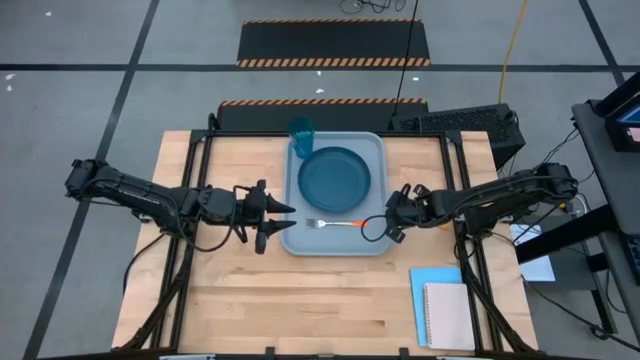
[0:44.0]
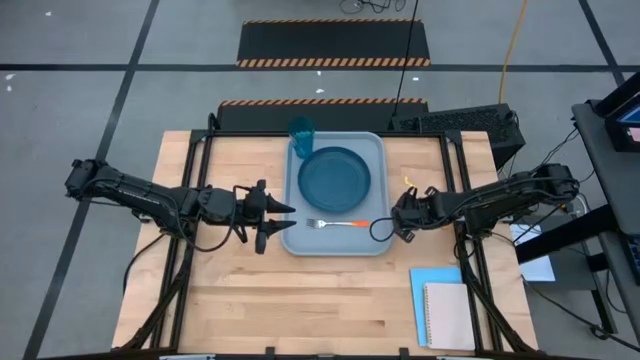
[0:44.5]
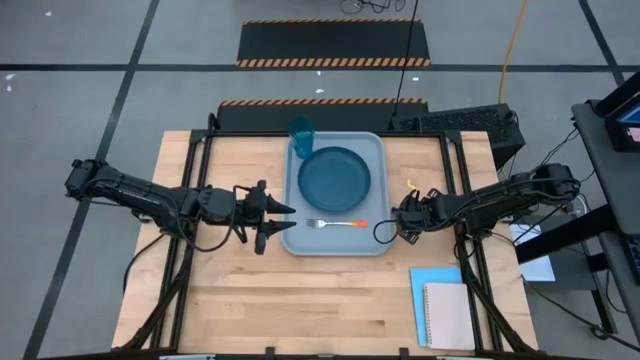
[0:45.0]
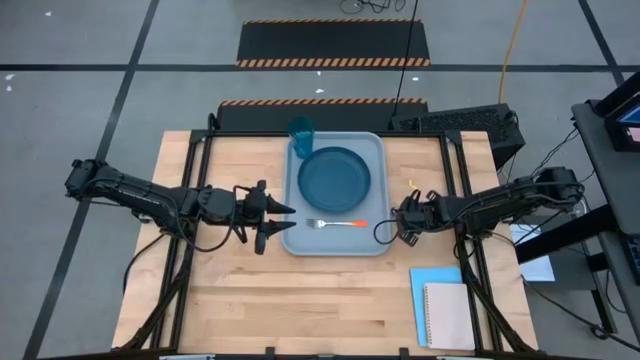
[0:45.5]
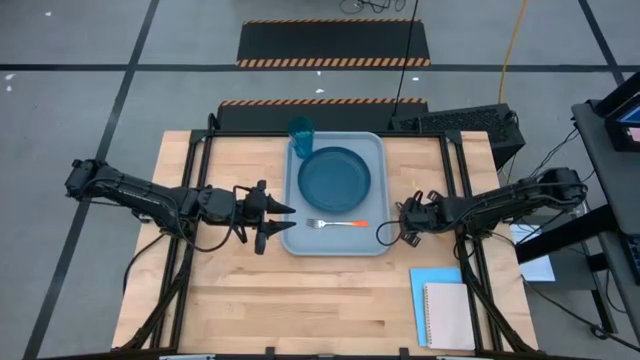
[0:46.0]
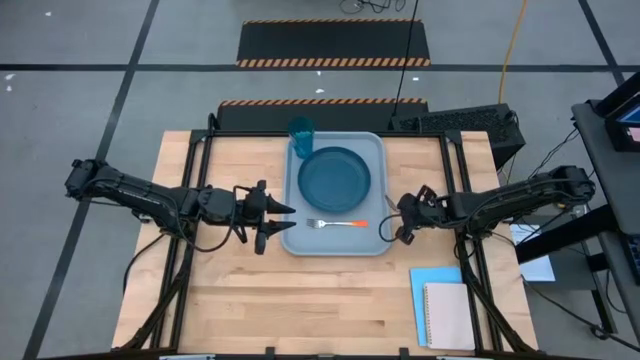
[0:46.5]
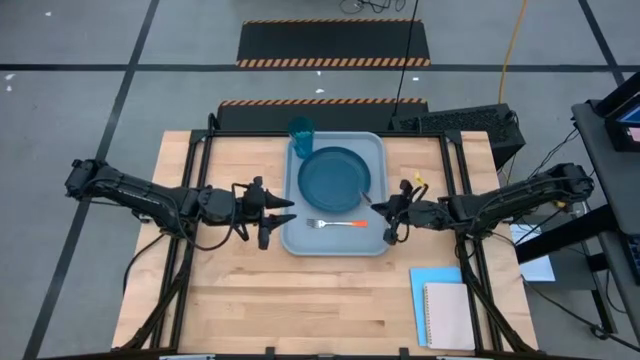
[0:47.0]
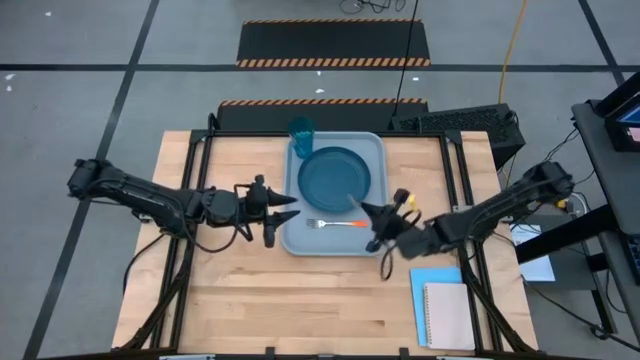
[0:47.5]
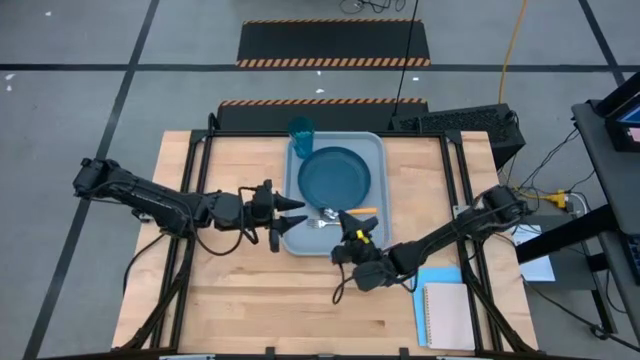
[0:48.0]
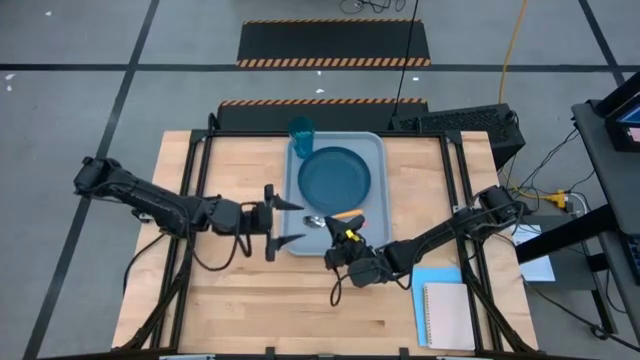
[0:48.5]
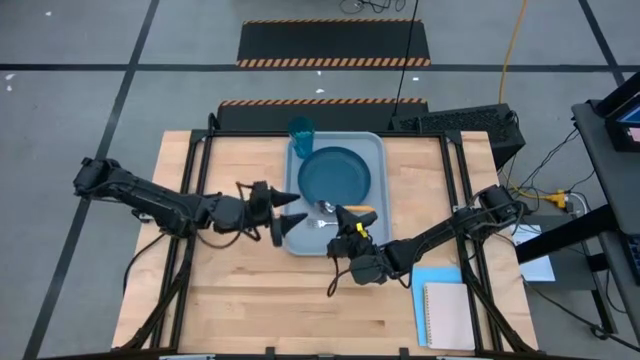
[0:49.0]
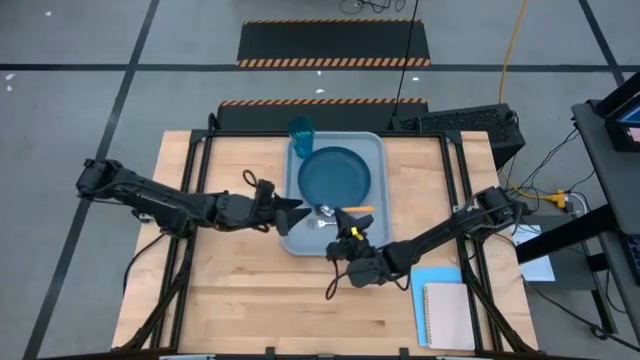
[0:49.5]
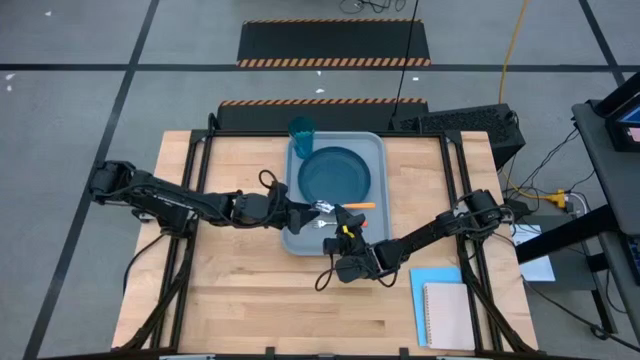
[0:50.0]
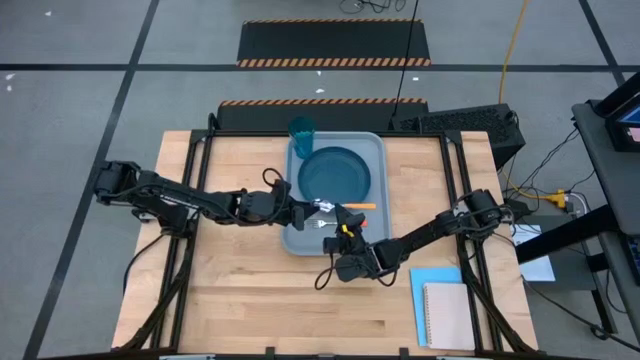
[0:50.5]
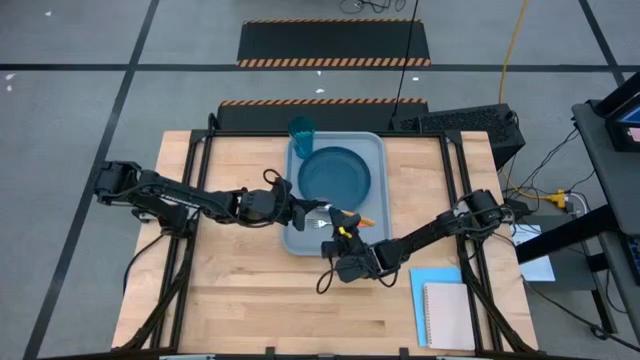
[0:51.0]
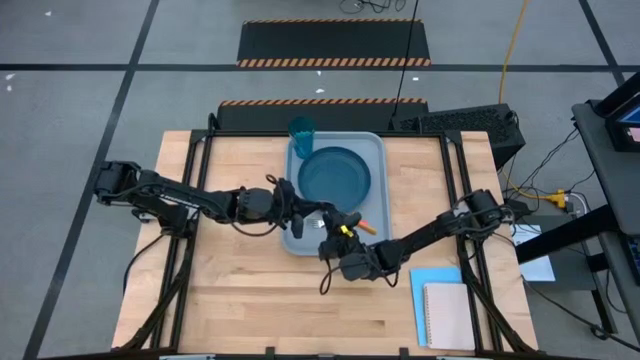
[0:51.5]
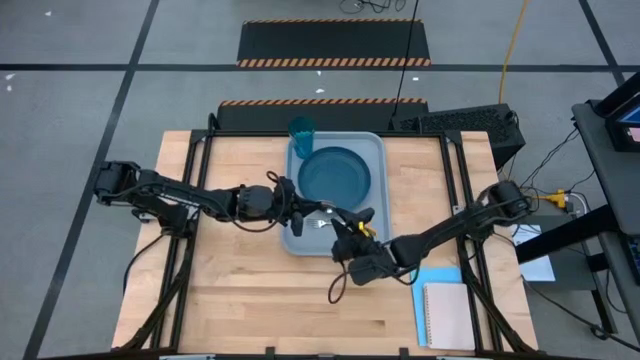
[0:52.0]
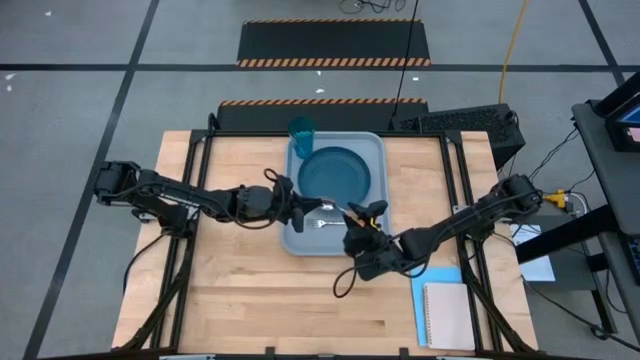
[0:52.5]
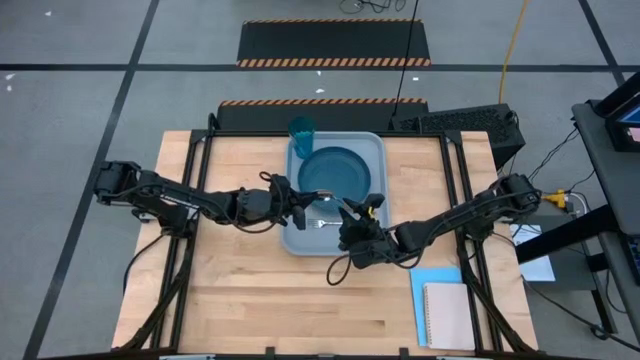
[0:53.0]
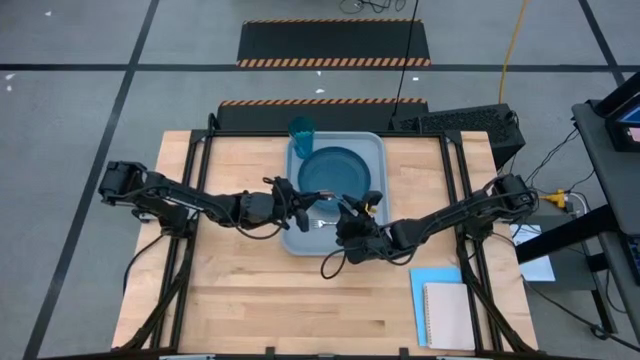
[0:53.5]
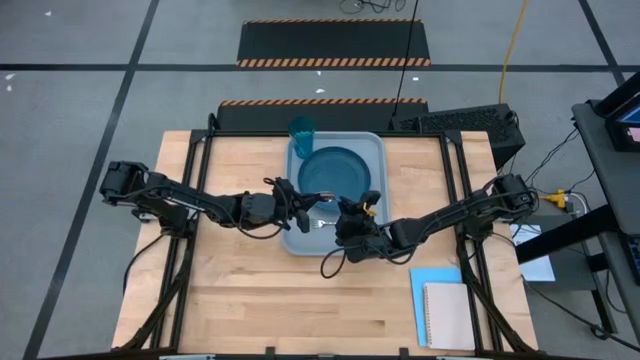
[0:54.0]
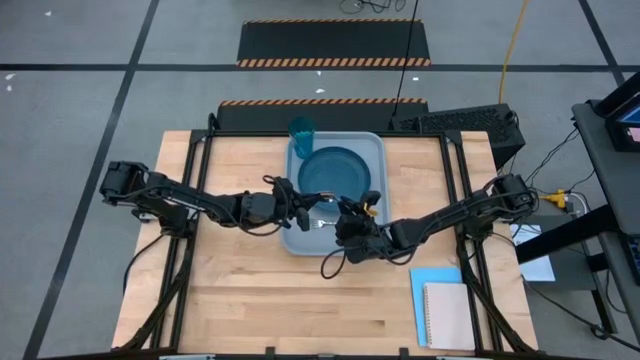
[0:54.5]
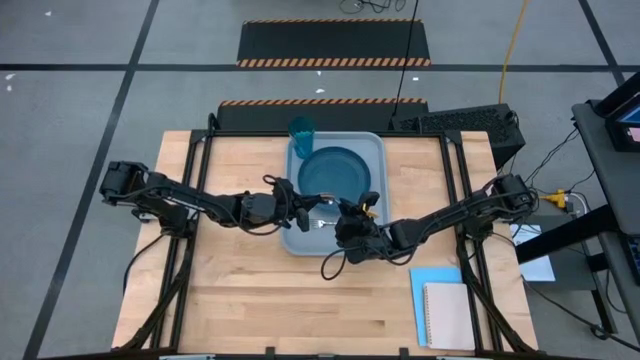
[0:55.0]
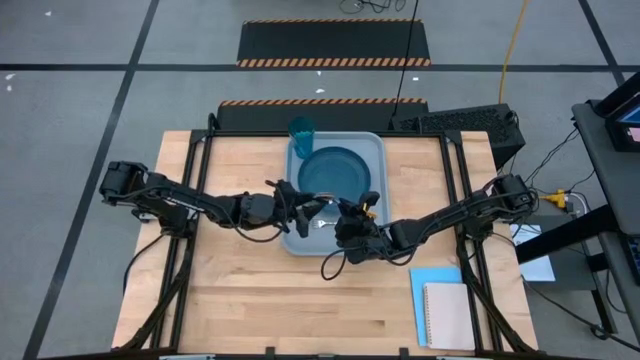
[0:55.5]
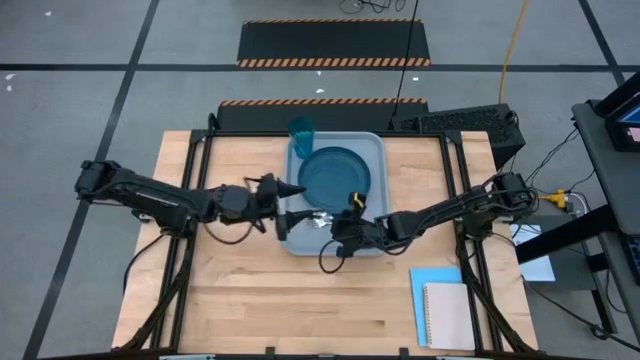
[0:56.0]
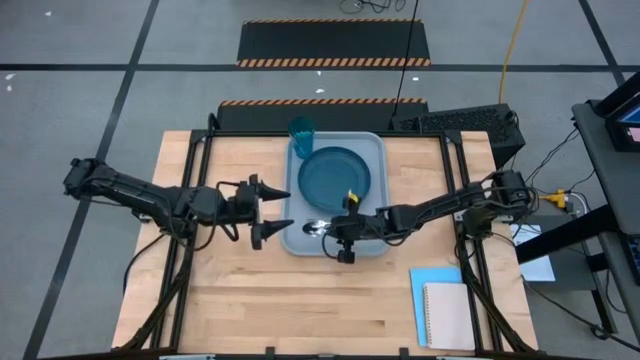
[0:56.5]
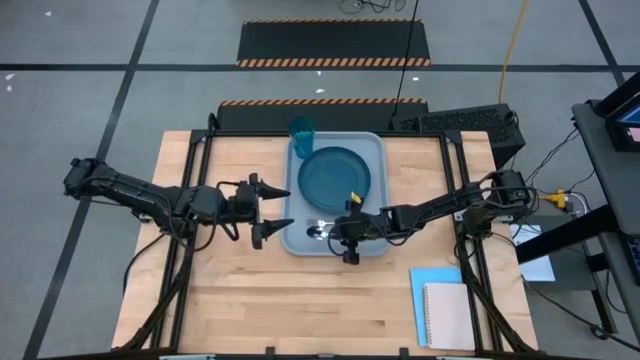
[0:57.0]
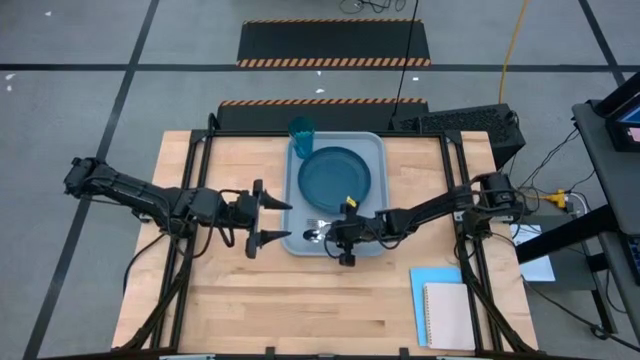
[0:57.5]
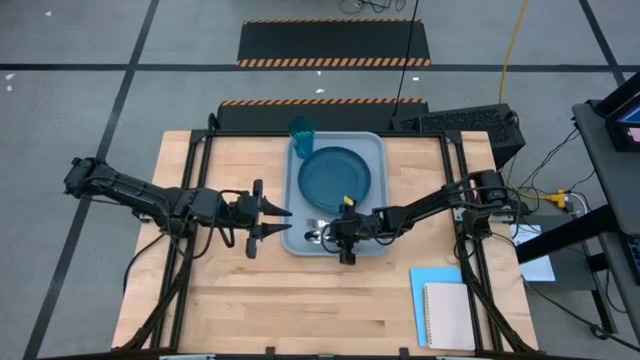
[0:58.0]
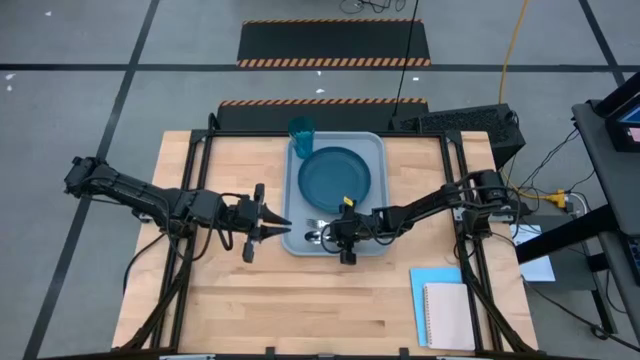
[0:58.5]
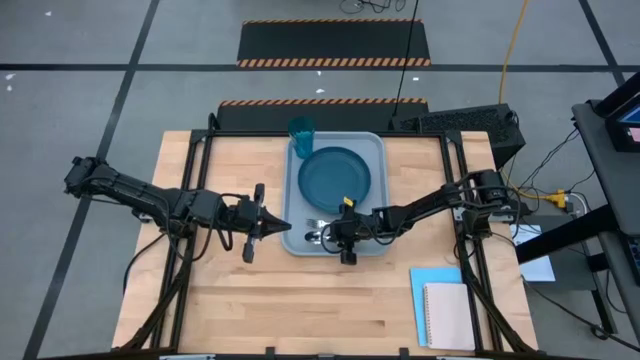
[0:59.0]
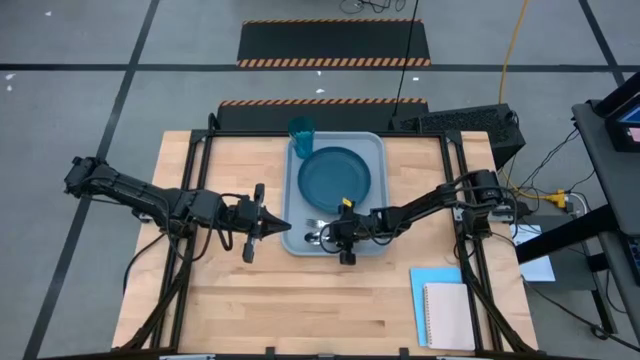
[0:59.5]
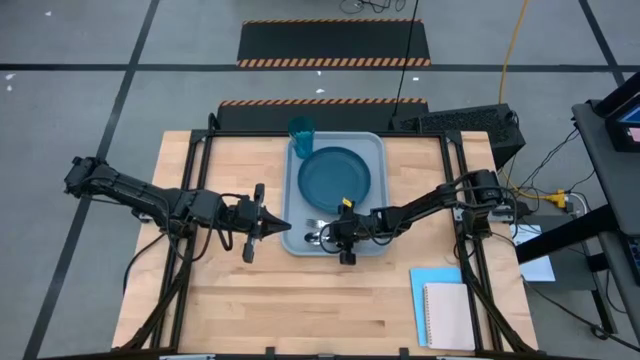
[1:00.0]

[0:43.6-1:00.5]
Task: Pick and place plate/cup/fork/spoon on tray
Put the orange spoon on the gray serving tray to the left of the orange fork
